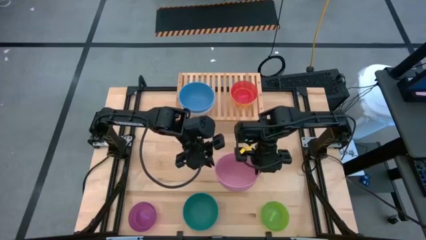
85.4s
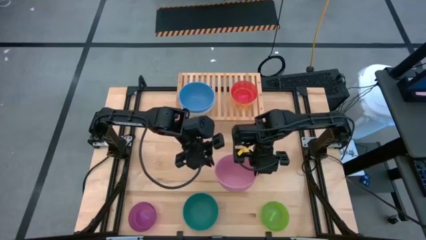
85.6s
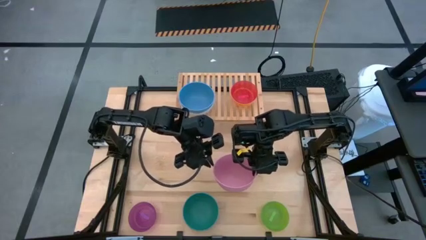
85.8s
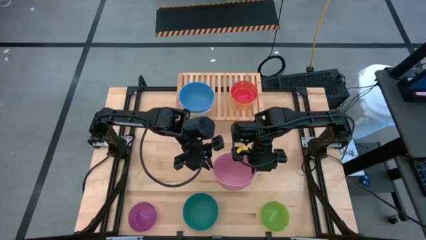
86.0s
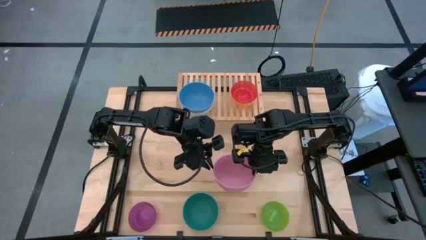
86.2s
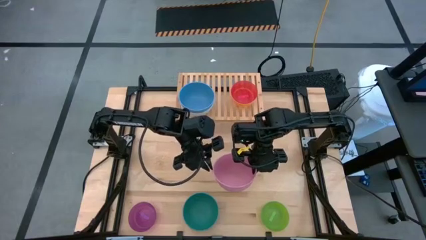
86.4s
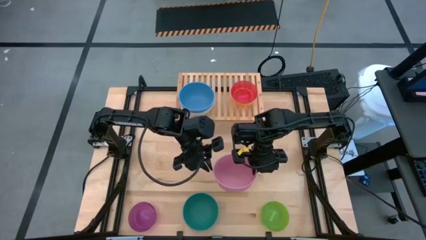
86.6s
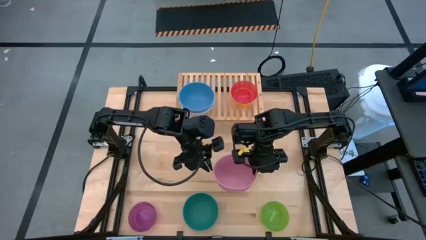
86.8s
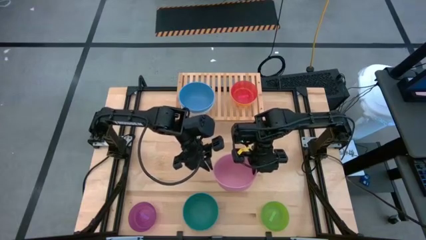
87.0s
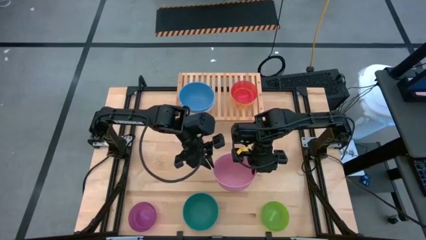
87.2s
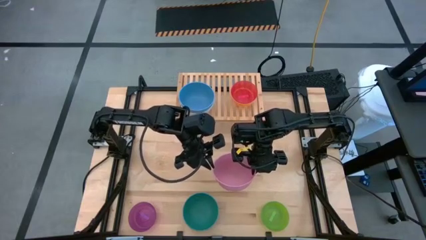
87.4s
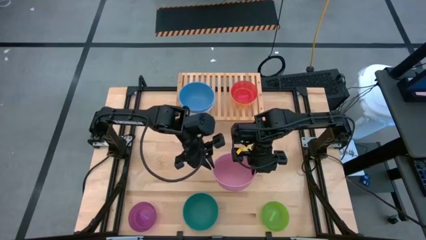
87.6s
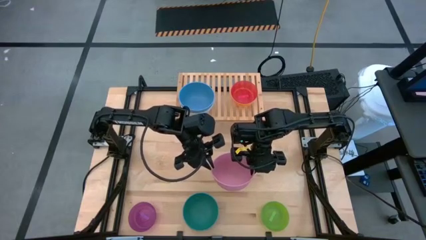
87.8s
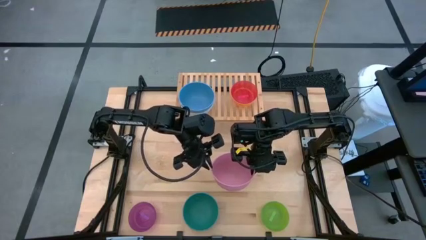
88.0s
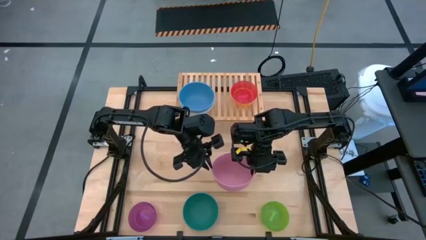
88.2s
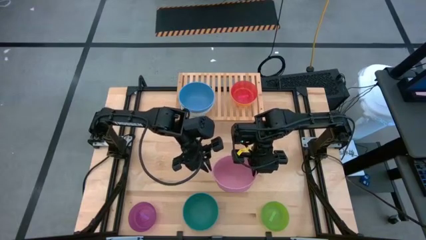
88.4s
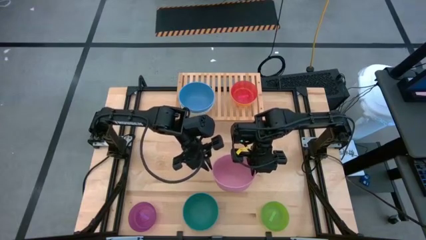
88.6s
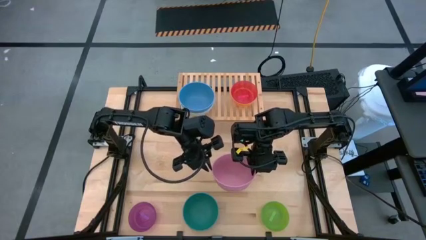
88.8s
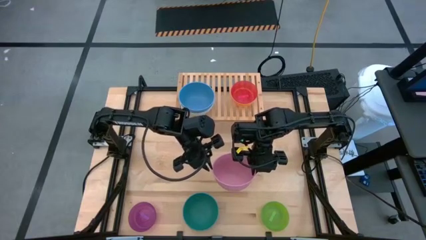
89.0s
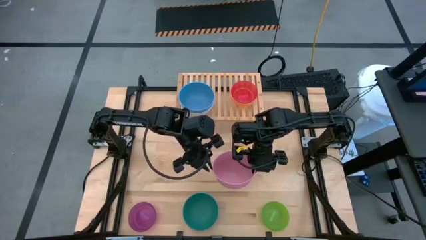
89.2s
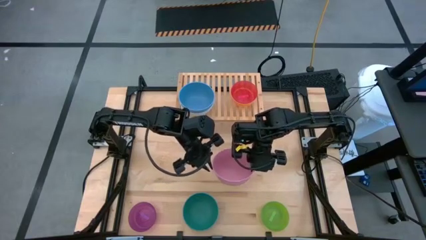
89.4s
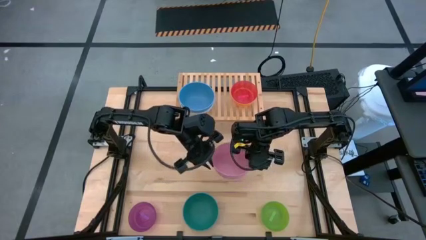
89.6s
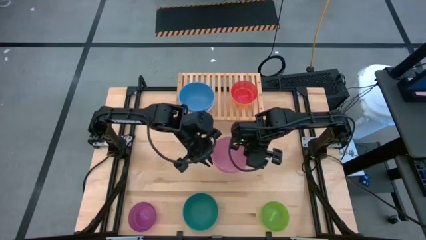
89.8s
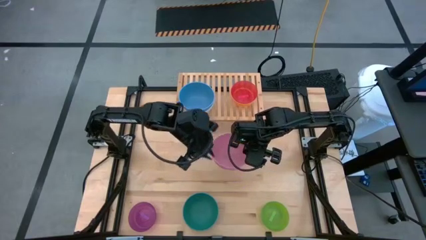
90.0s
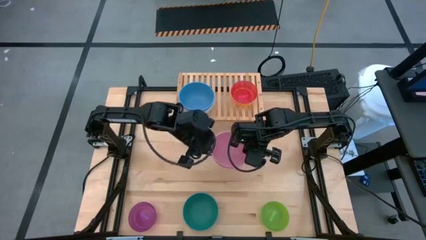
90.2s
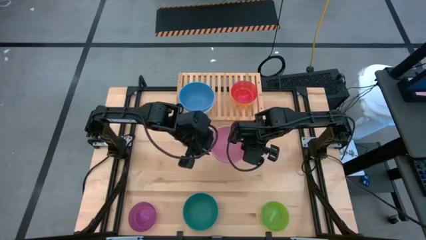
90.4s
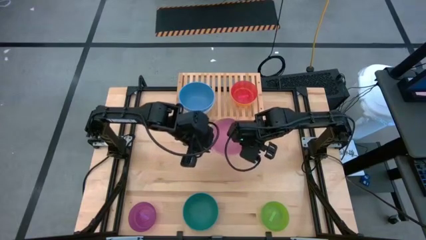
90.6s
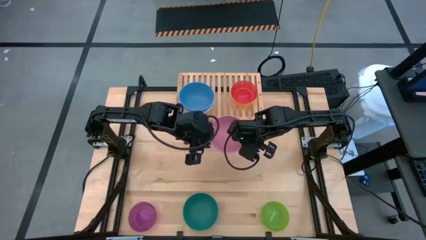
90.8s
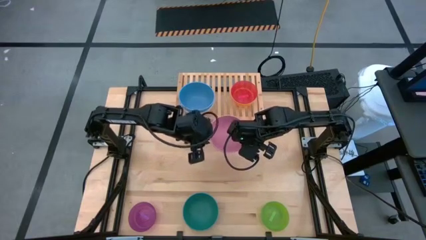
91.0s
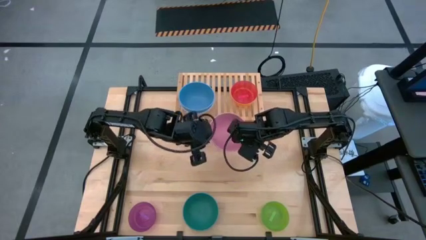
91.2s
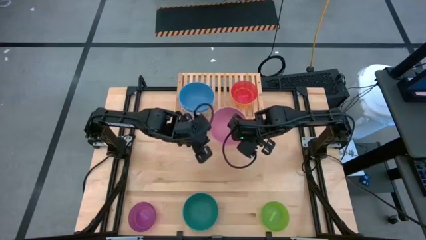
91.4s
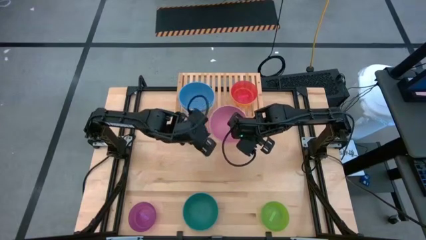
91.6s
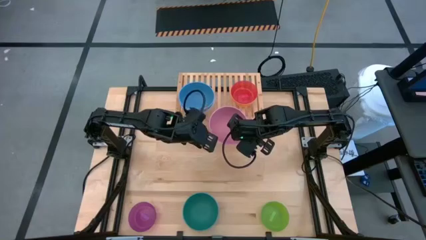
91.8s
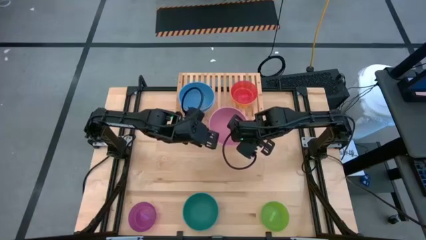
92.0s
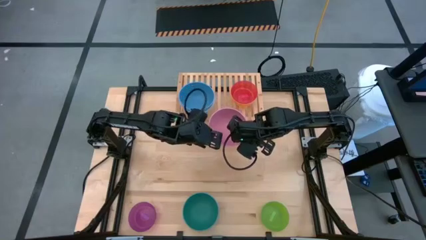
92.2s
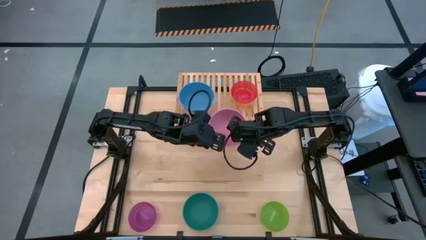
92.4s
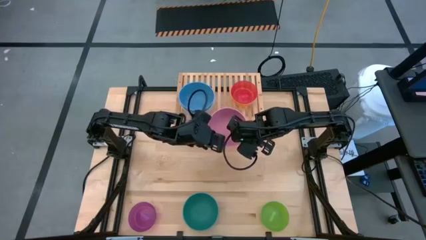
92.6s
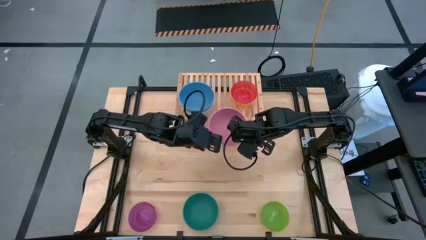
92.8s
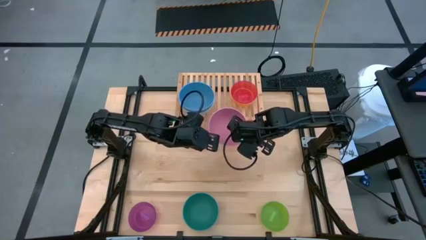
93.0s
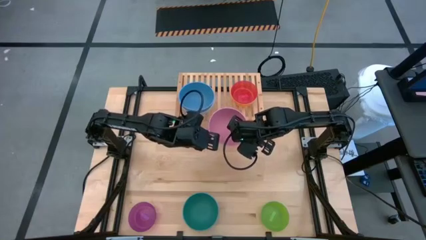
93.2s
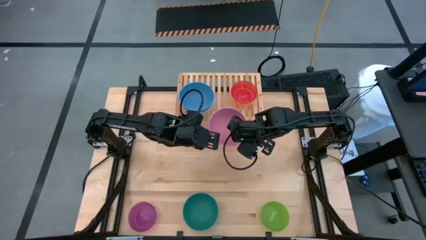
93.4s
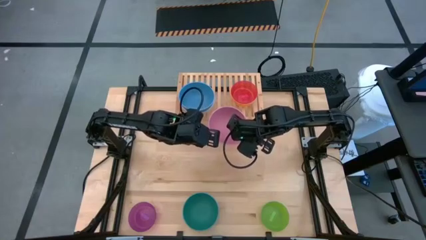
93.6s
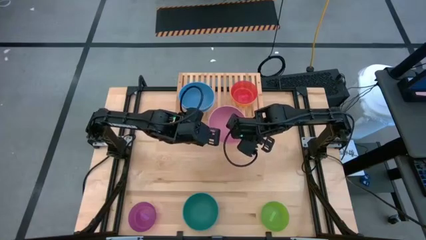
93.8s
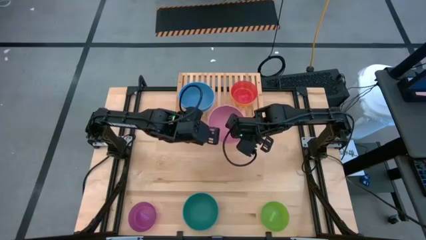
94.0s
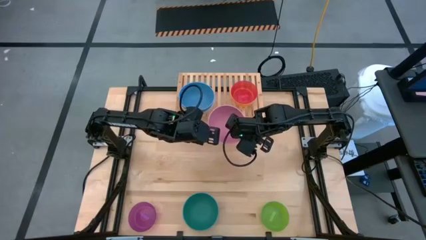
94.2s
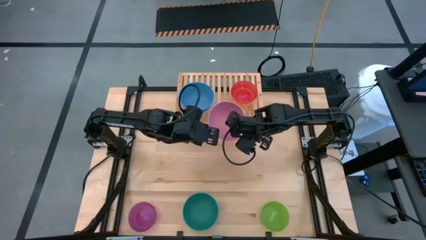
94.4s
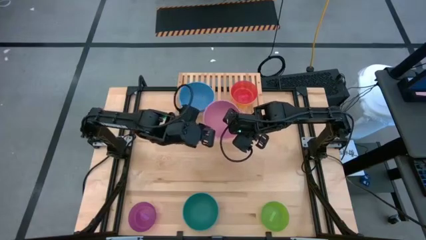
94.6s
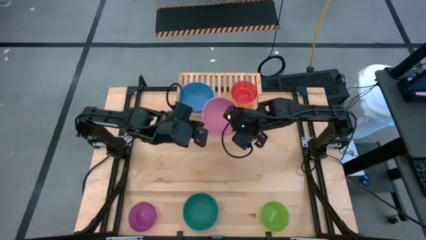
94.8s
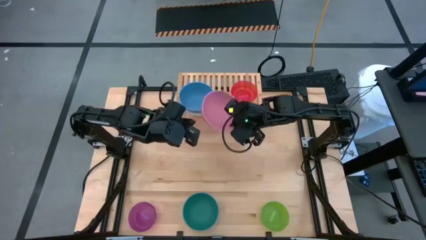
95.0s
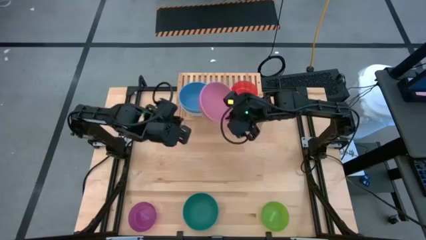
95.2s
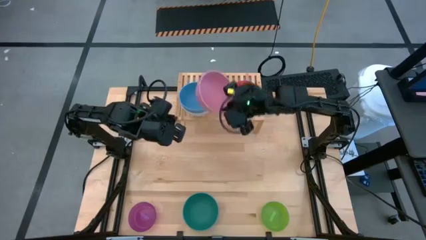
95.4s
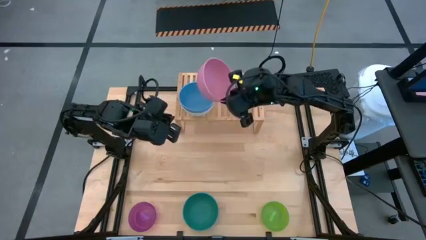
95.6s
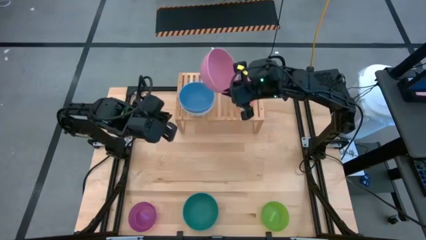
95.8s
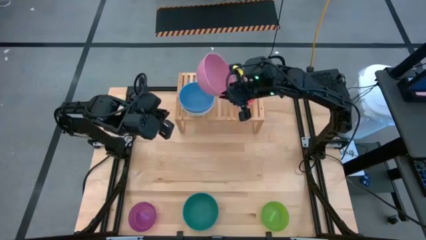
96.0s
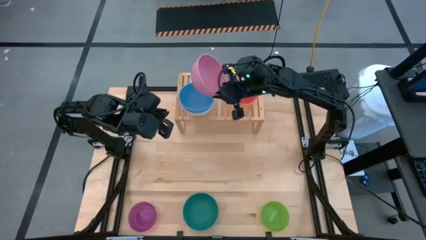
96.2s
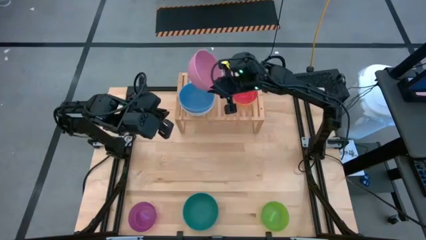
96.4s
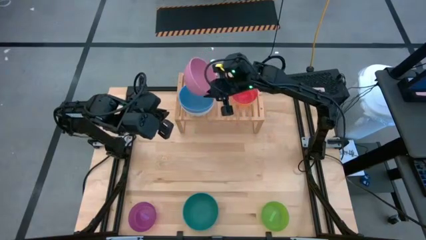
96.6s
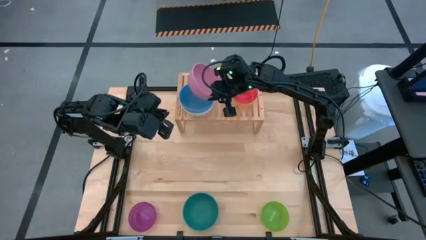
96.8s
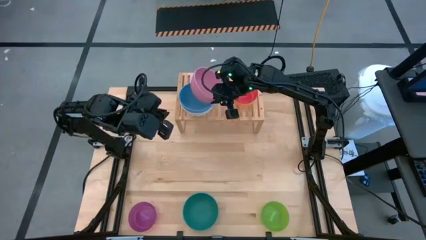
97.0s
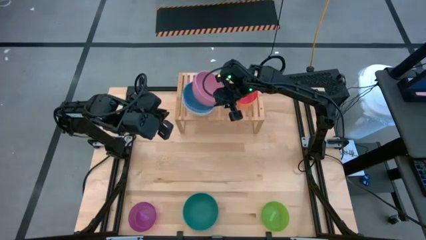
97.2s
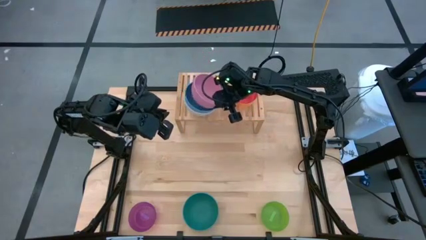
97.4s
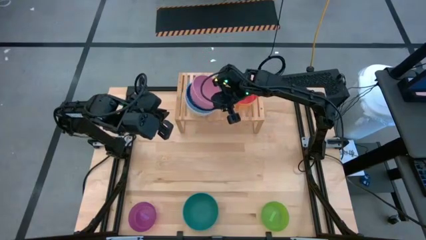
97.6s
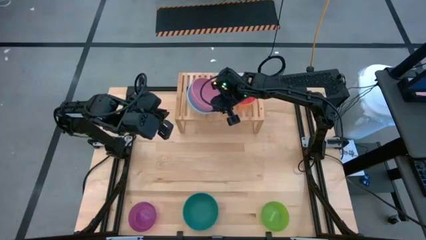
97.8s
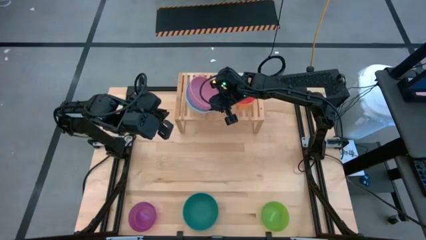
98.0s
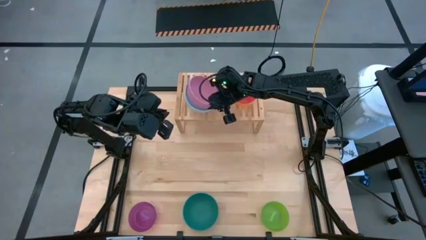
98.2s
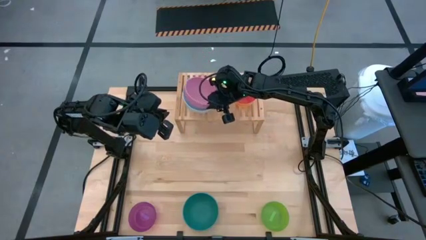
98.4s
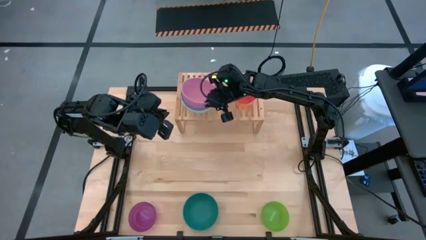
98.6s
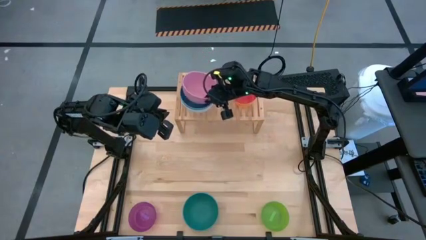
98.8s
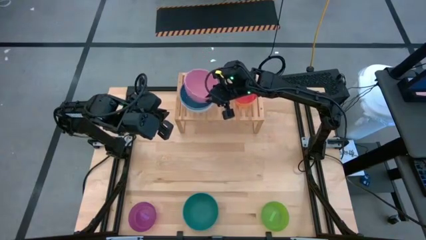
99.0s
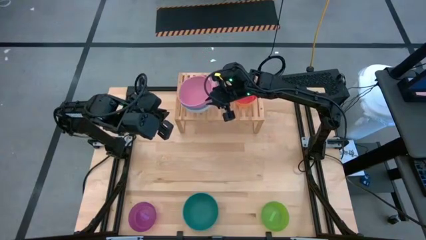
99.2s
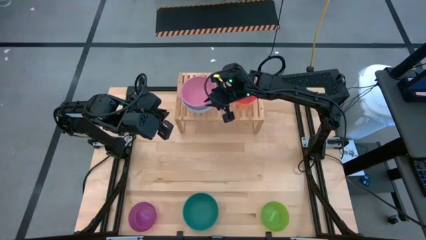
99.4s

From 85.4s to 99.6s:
Task: Place and stack bowls onto a shelf
Stack the pink bowl on top of the blue bowl on the shelf

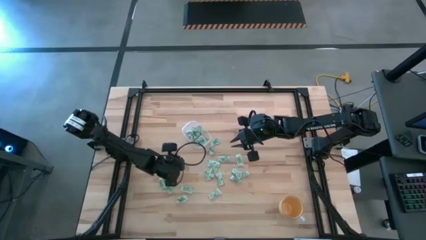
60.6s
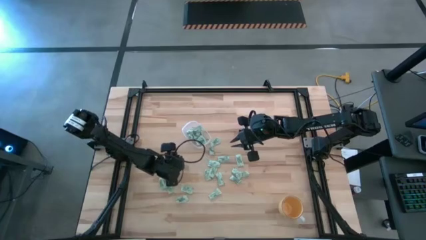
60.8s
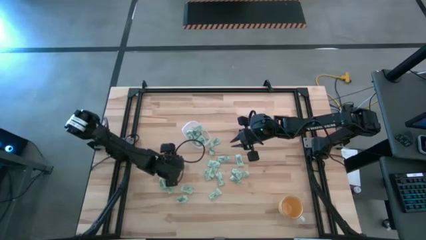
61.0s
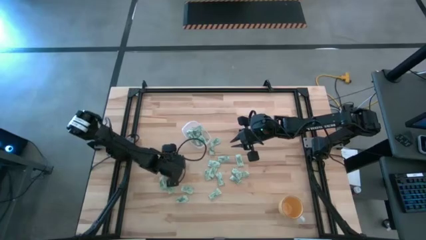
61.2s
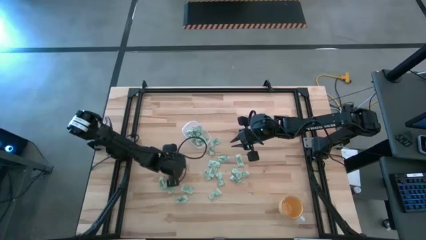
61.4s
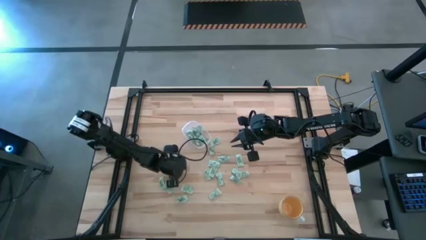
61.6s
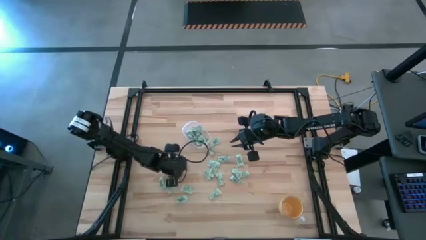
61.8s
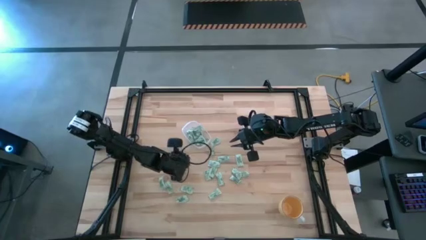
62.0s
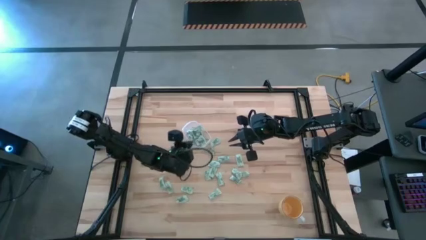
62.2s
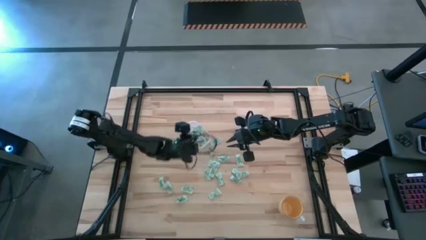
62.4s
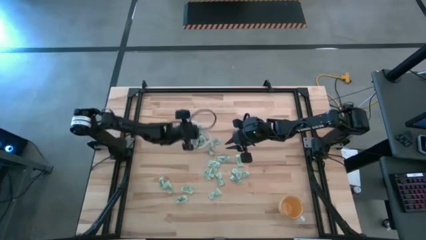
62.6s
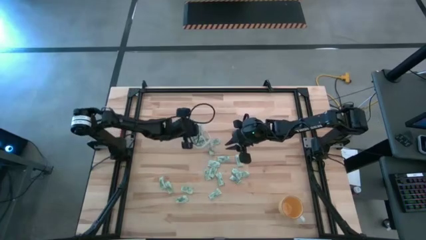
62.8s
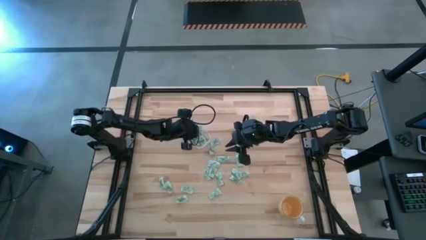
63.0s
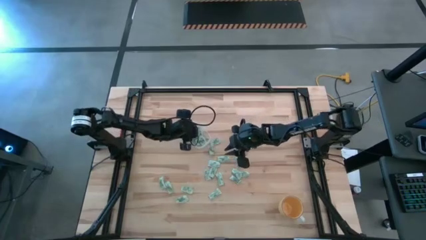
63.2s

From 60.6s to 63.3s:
Task: Pick and place Stevia / Truvia into bins
Put the stevia packet into the transparent bin

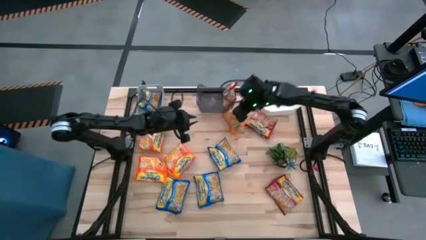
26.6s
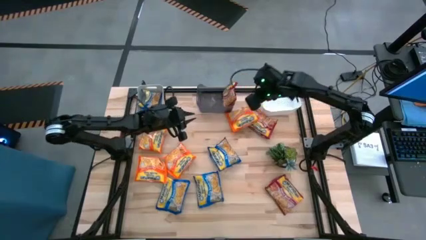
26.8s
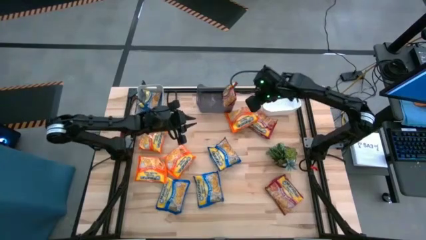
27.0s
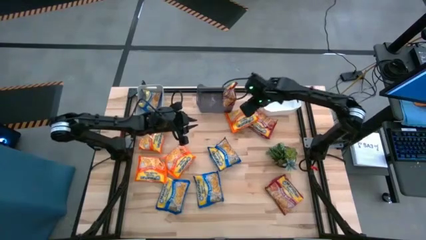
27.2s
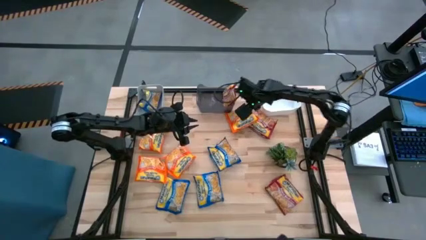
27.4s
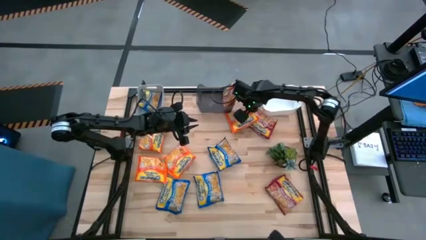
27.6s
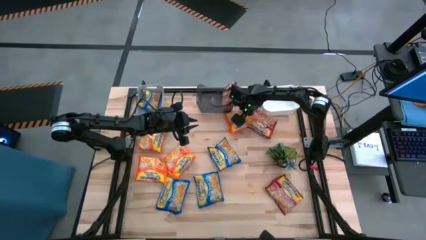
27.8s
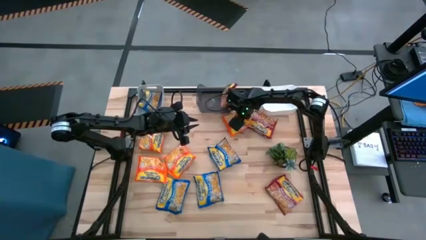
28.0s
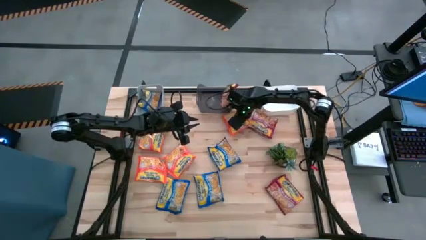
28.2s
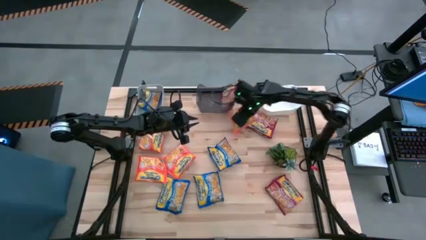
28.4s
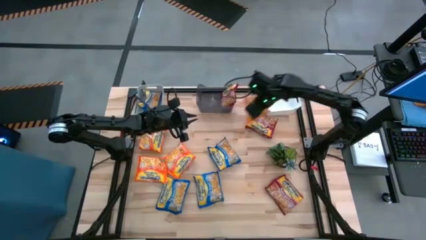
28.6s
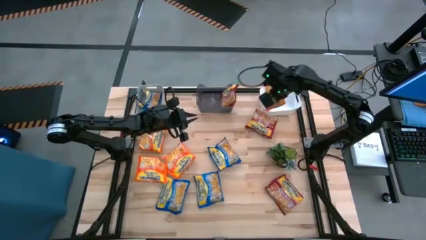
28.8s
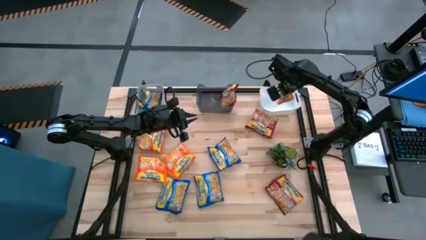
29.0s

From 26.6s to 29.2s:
Task: Sort Maruchan noodles
Put the orange noodle pack into the white bin
